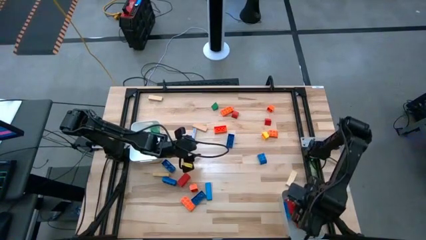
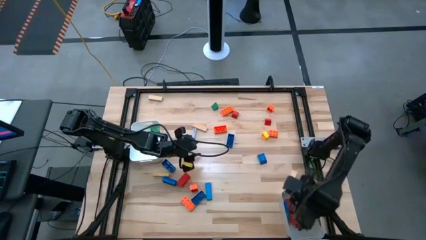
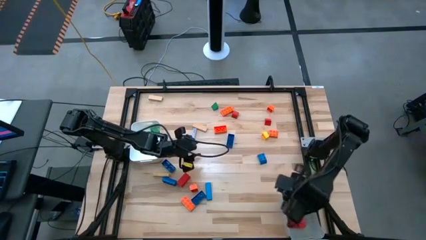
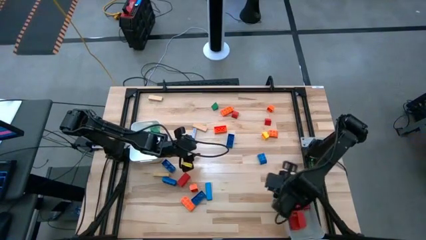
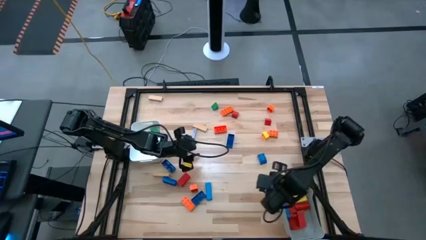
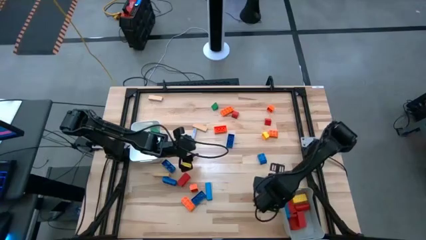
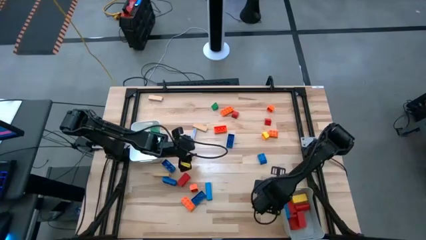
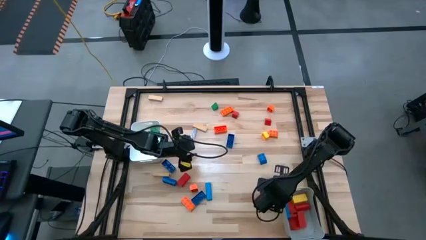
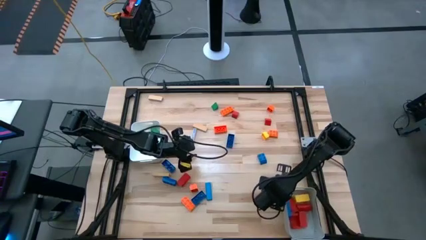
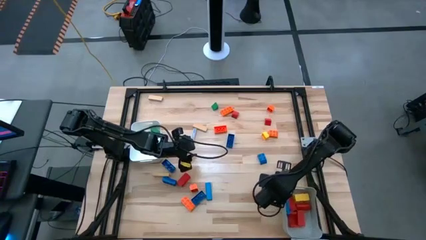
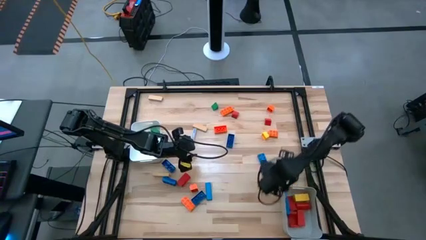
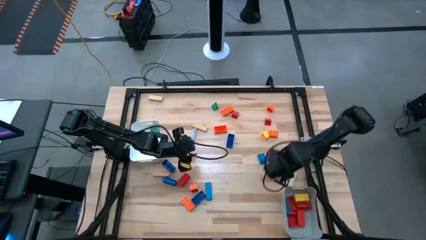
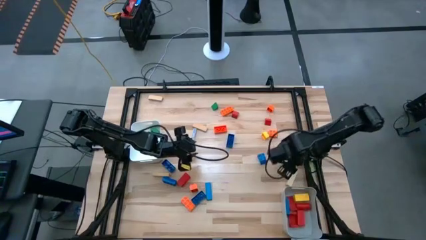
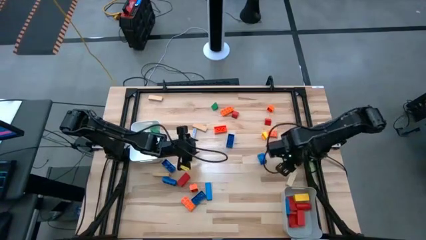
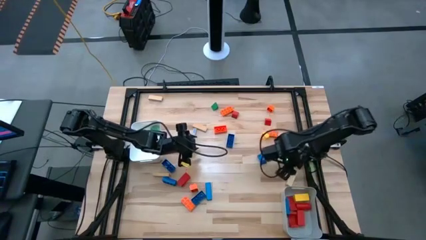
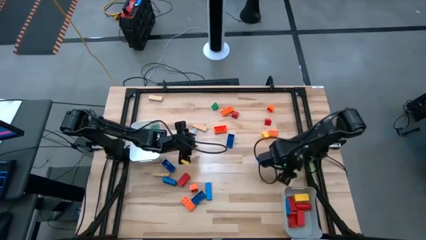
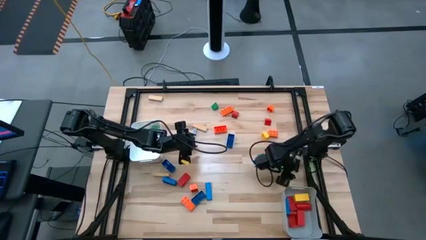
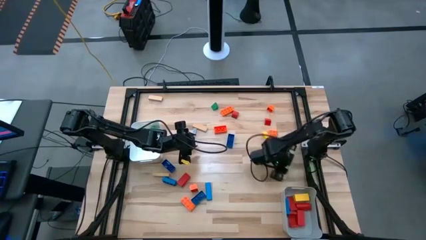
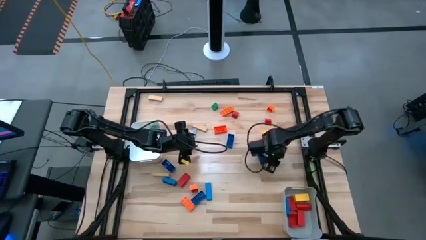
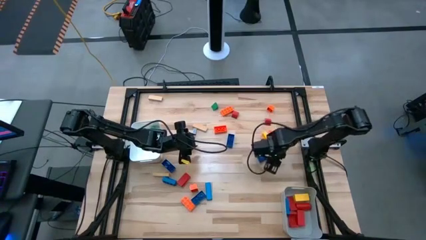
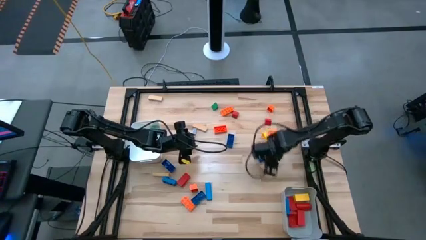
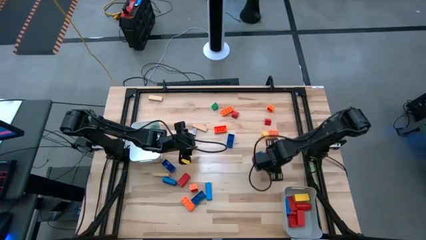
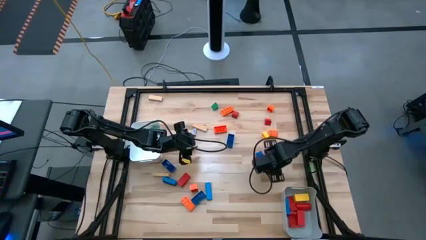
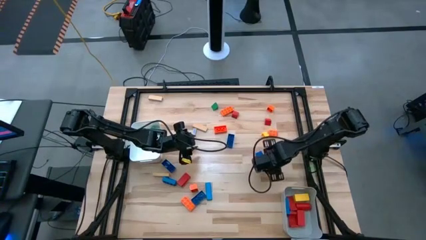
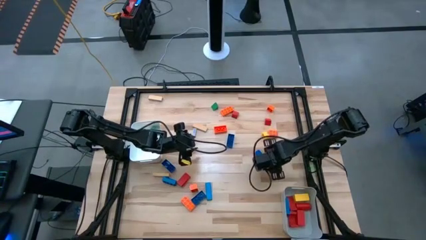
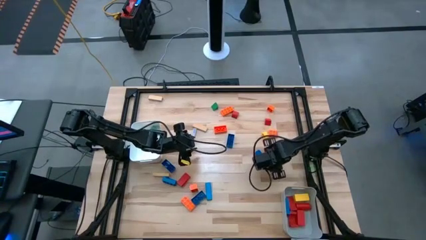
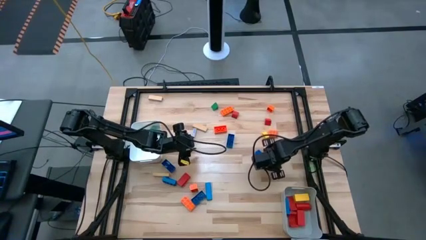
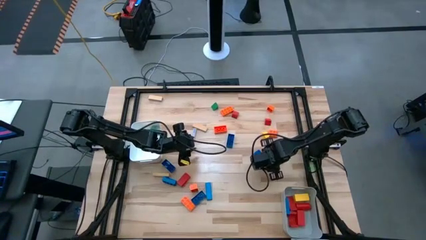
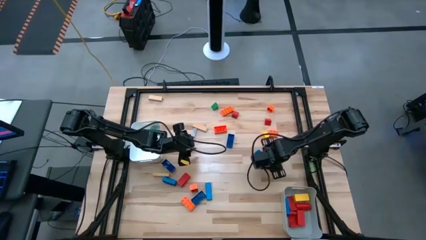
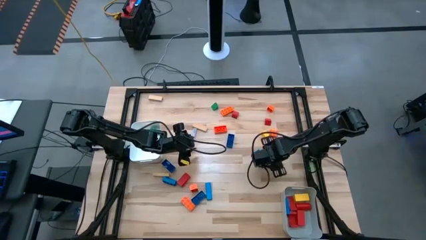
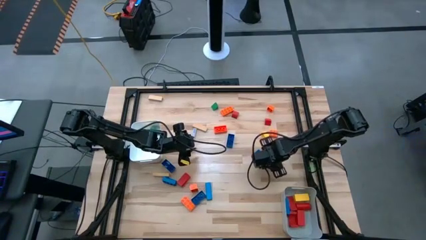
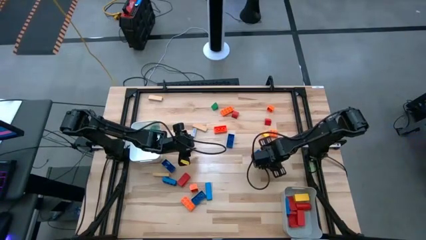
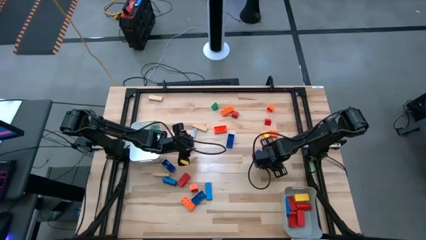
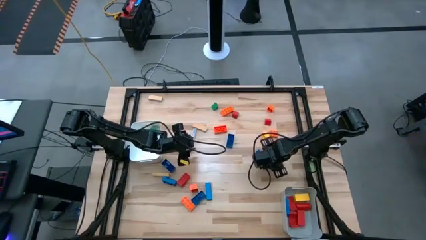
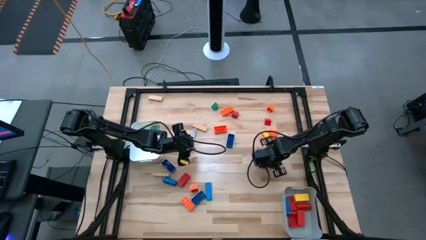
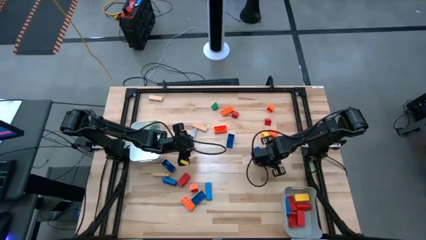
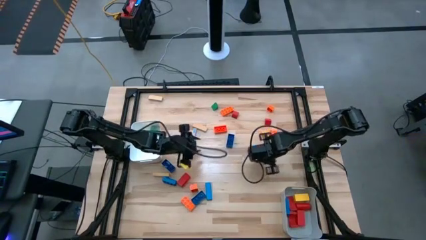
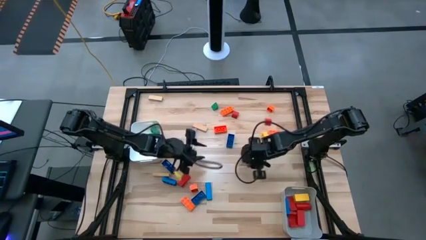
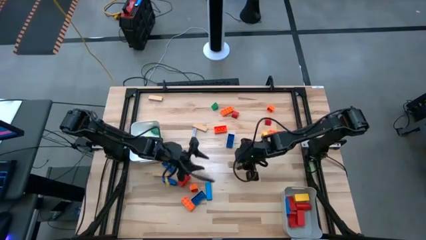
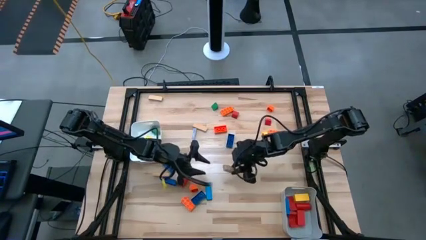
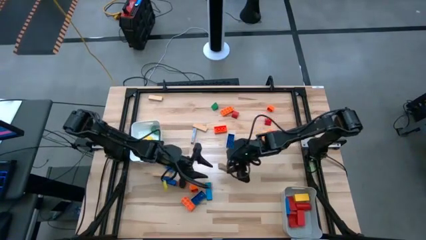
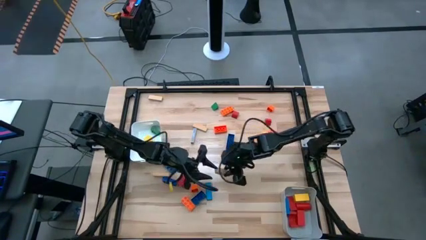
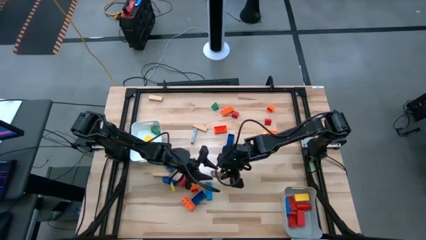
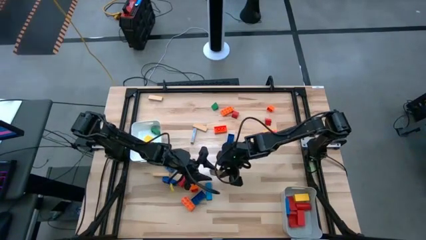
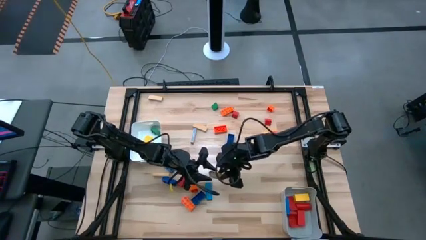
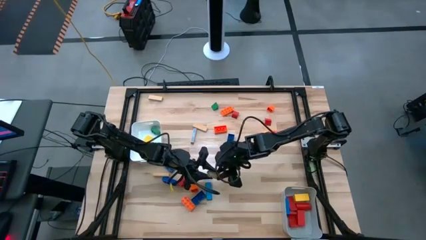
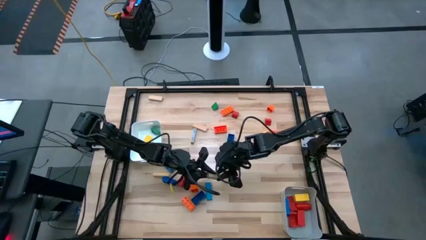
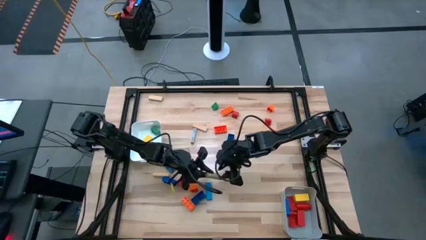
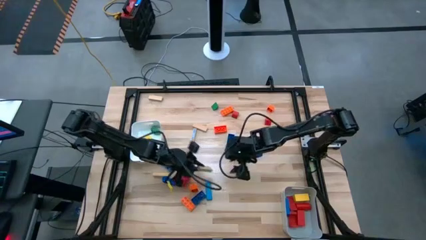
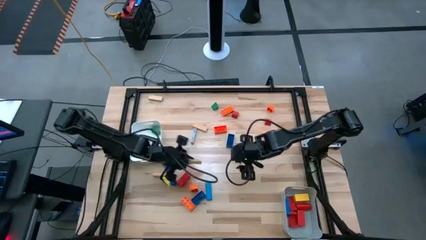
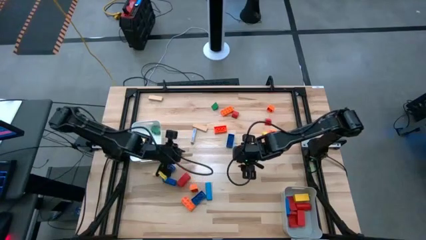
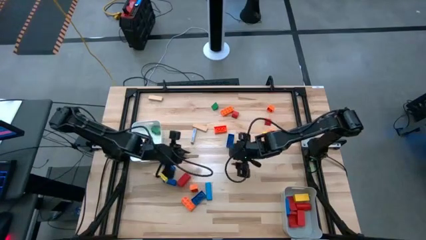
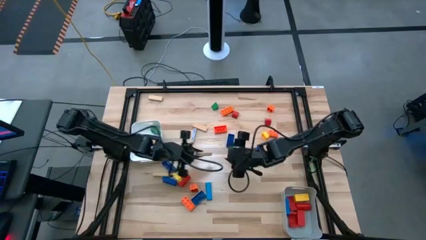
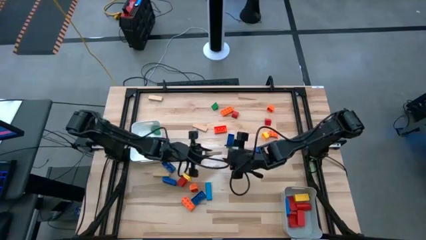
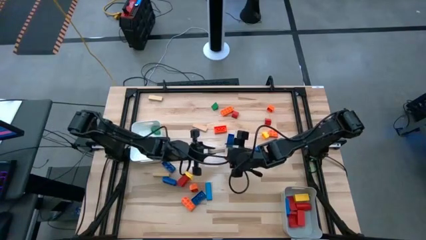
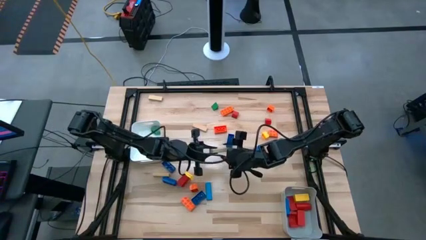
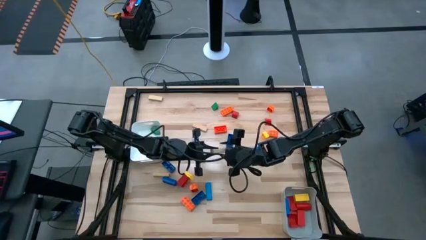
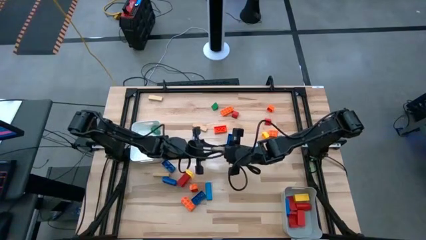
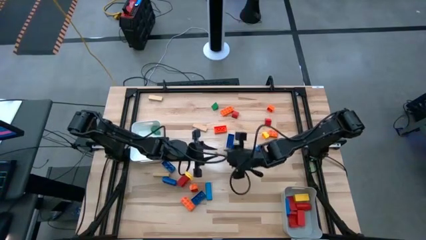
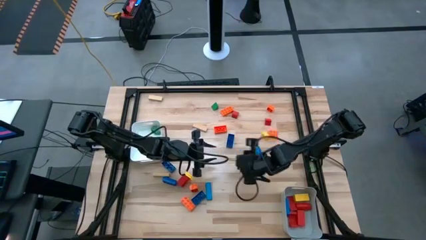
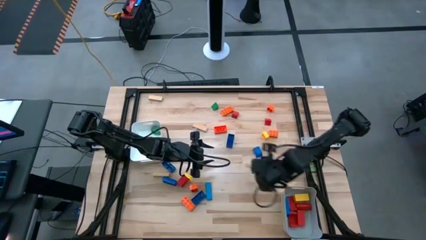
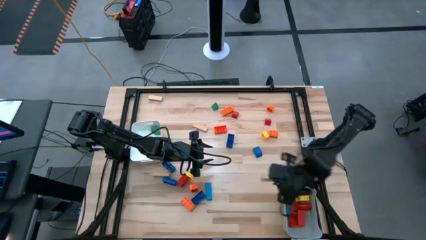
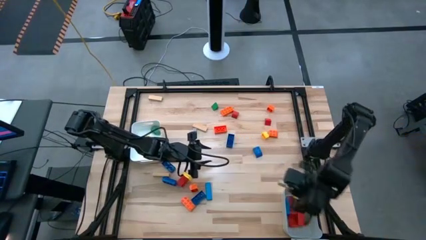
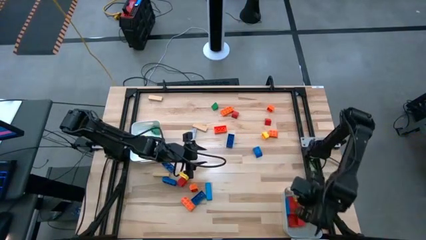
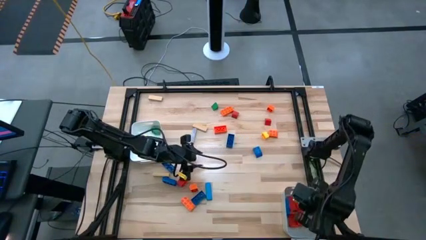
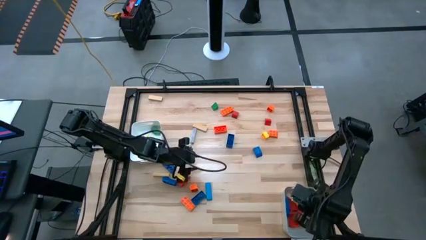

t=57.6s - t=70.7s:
Task: Sort blocks by size
Put the brown large block into the gray bin

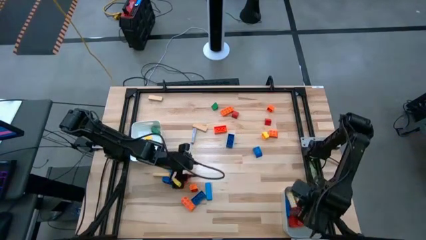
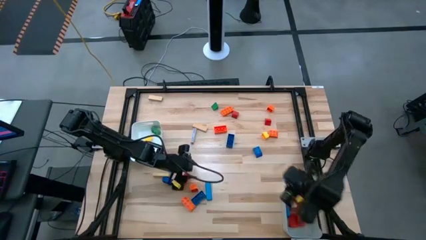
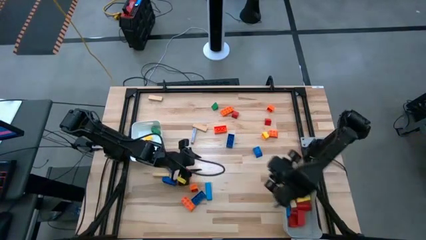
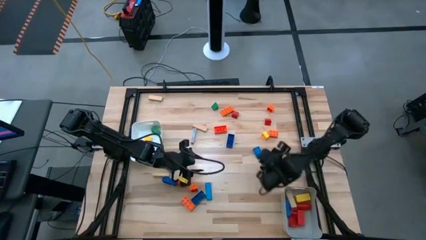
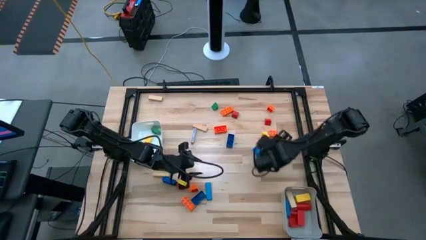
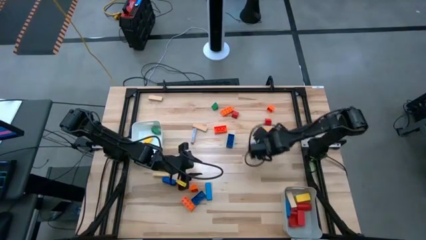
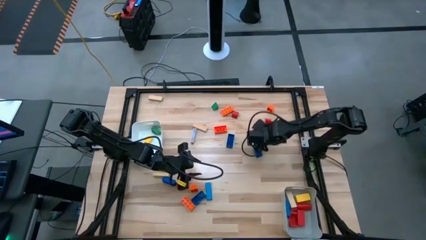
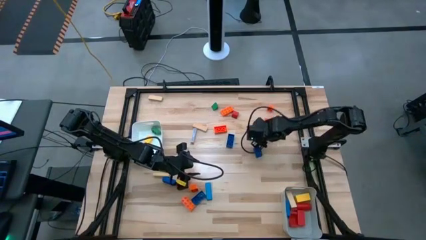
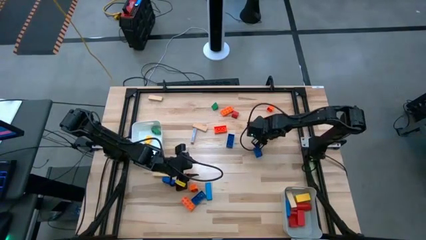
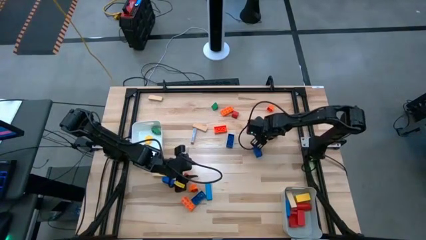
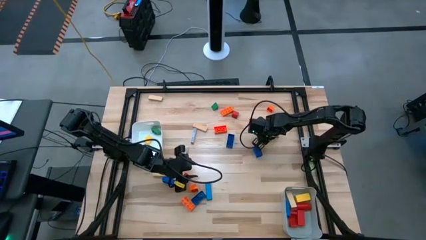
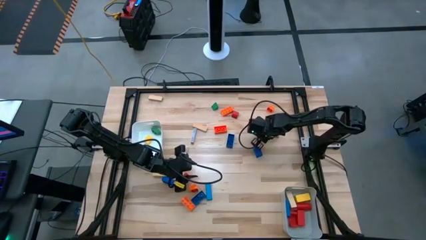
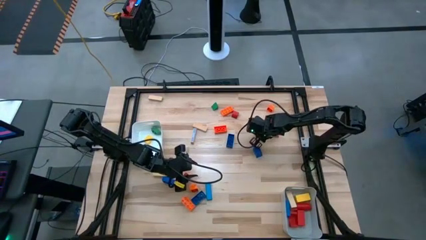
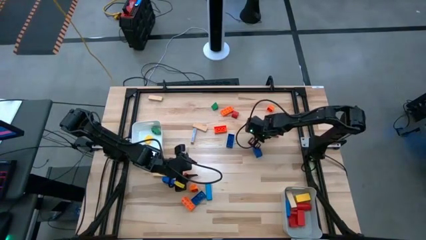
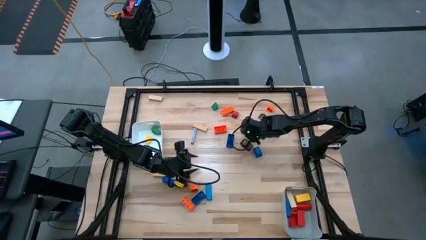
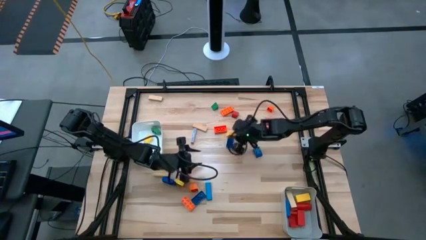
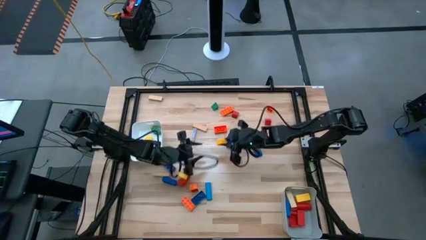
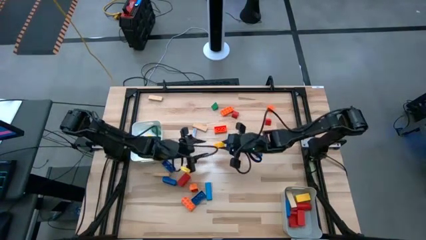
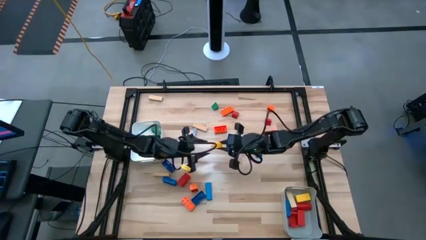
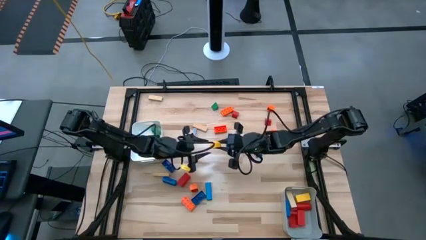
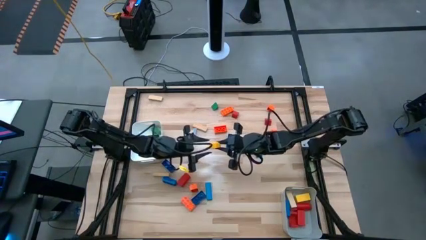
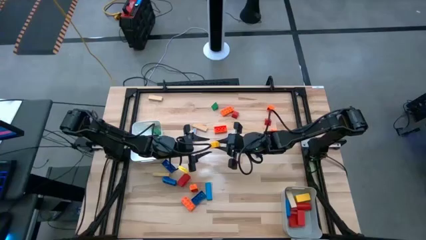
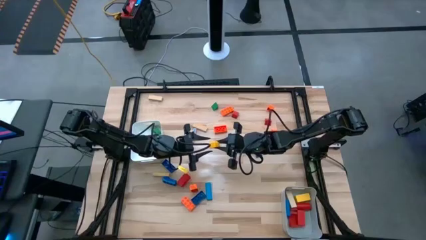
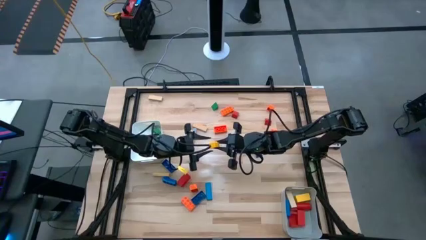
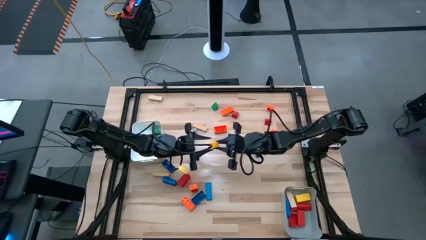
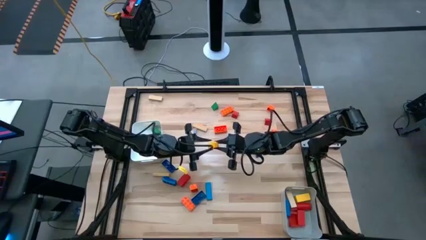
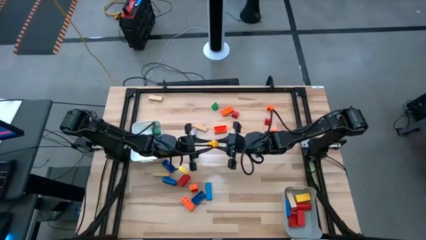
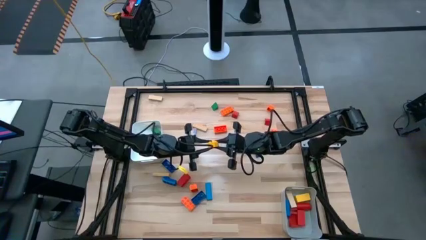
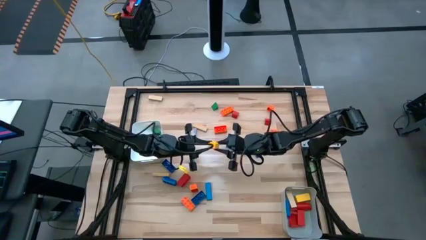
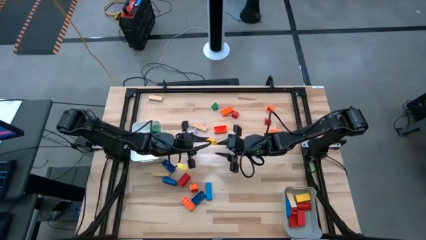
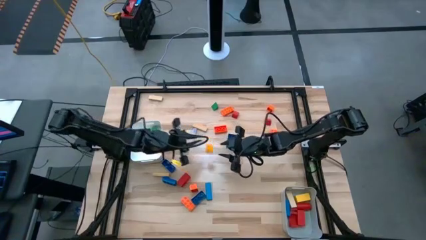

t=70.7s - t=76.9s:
Put the yellow small game piece into the white bin
